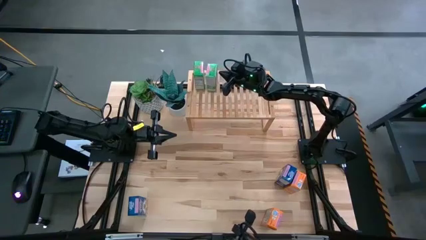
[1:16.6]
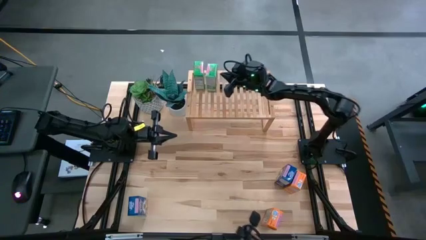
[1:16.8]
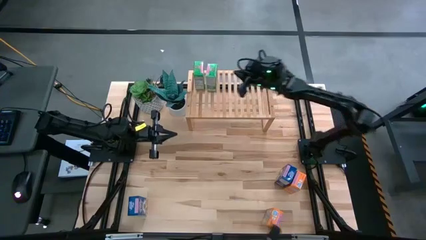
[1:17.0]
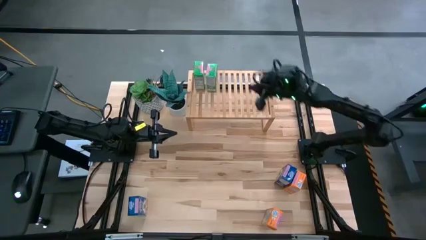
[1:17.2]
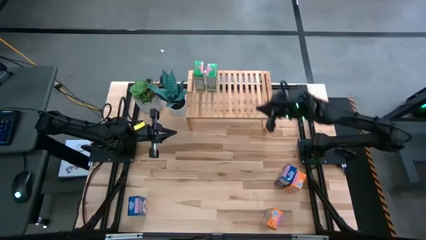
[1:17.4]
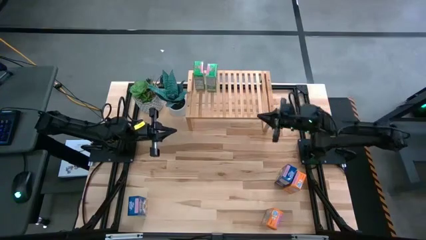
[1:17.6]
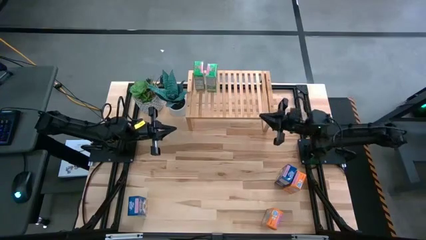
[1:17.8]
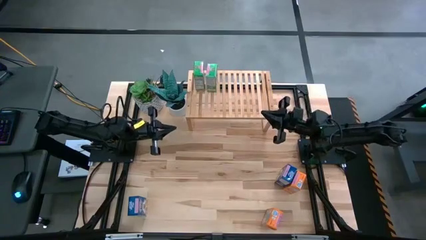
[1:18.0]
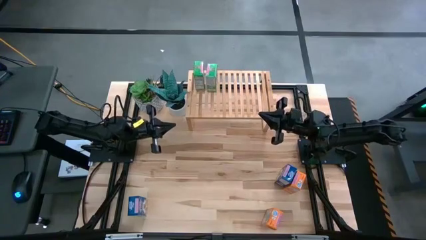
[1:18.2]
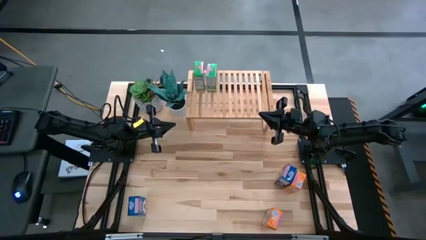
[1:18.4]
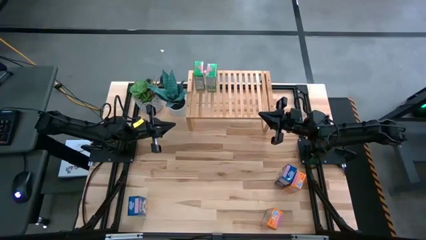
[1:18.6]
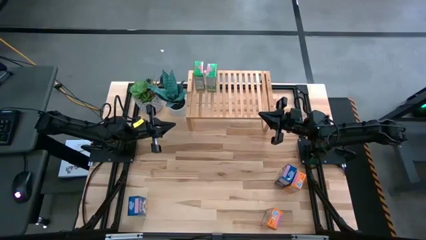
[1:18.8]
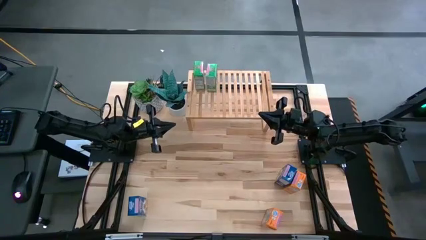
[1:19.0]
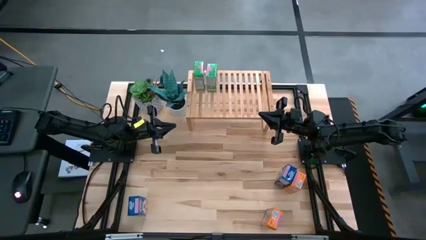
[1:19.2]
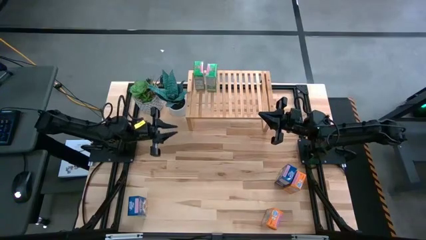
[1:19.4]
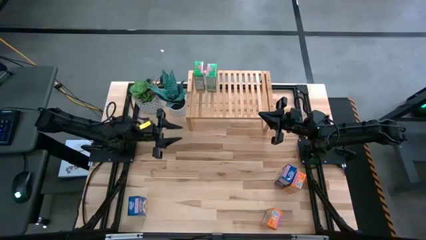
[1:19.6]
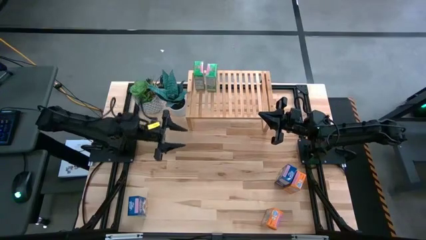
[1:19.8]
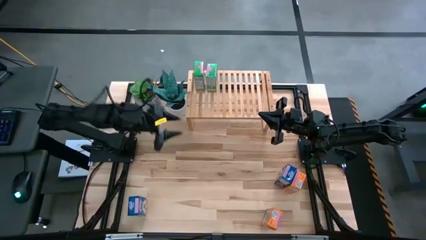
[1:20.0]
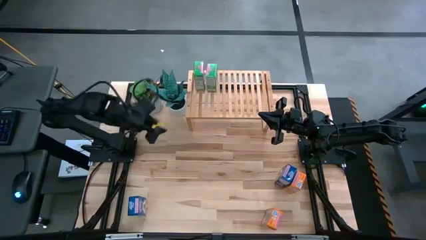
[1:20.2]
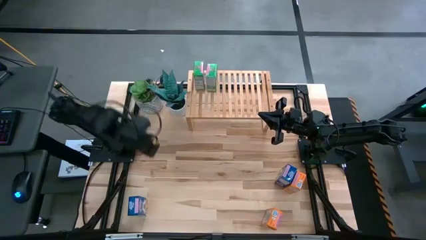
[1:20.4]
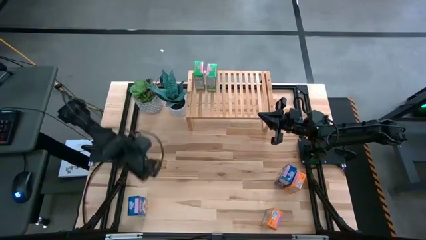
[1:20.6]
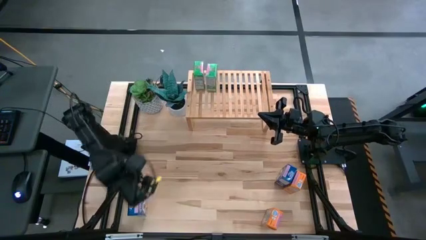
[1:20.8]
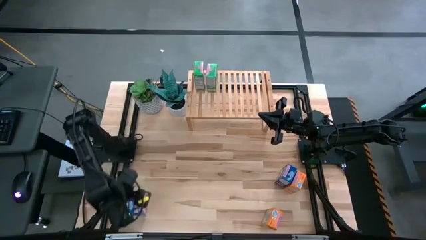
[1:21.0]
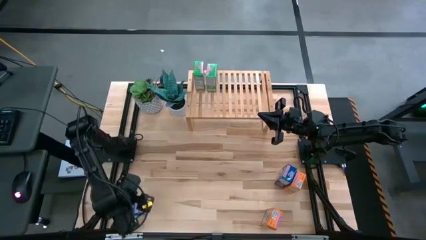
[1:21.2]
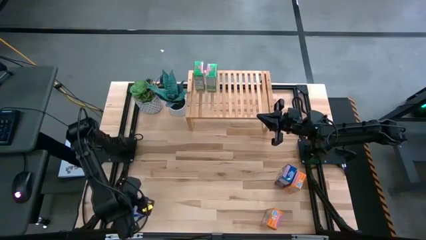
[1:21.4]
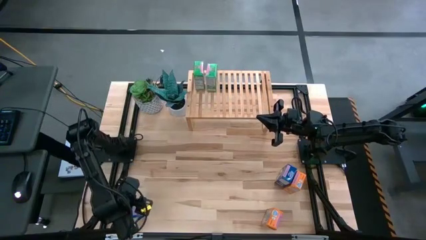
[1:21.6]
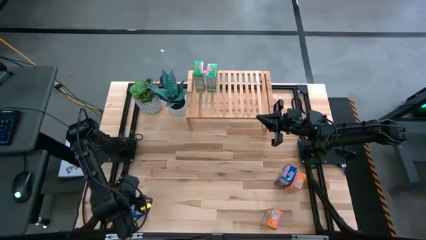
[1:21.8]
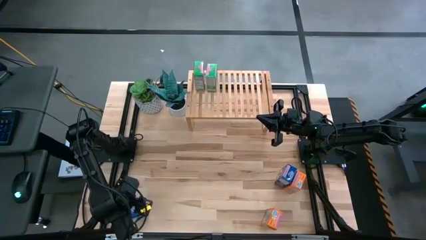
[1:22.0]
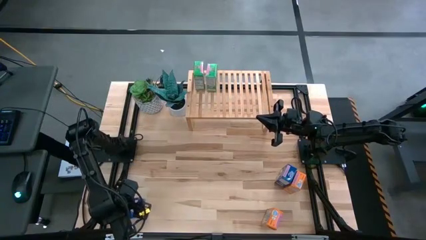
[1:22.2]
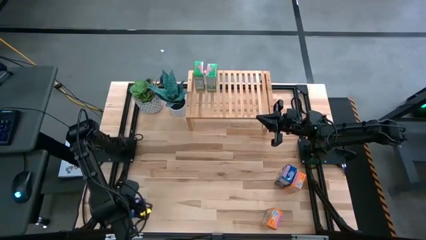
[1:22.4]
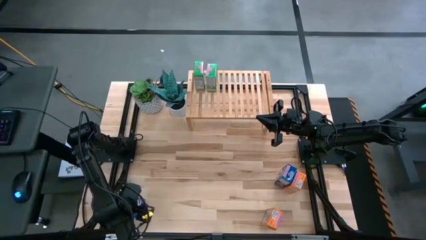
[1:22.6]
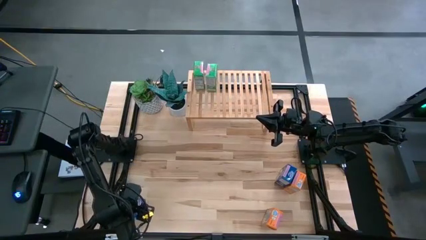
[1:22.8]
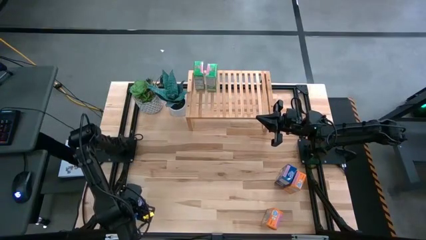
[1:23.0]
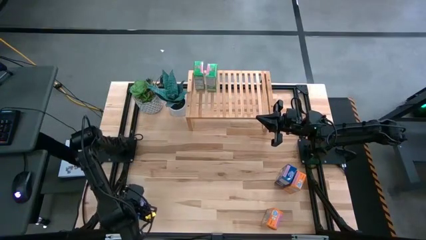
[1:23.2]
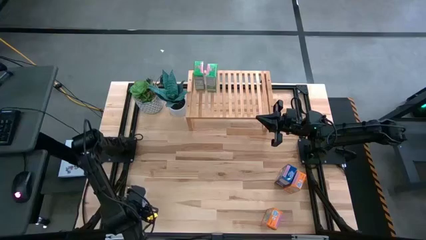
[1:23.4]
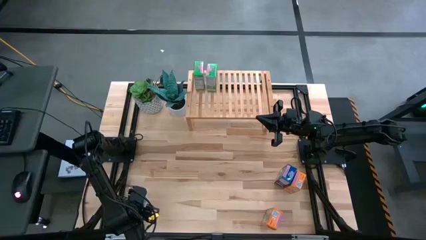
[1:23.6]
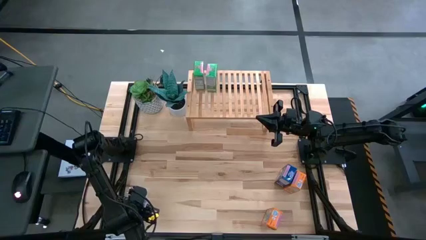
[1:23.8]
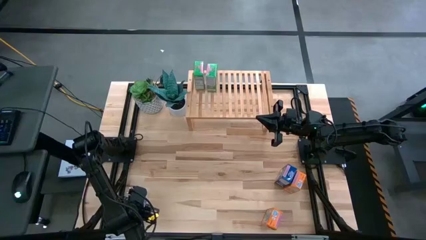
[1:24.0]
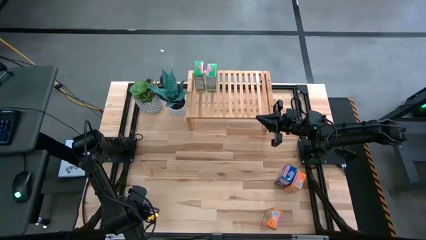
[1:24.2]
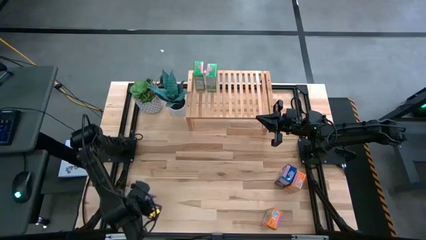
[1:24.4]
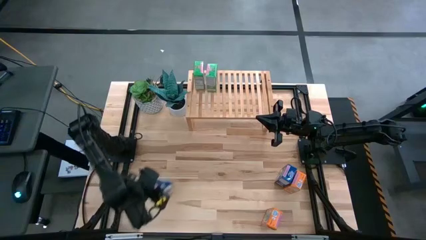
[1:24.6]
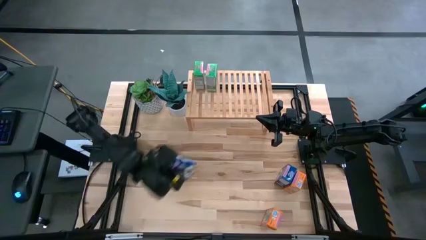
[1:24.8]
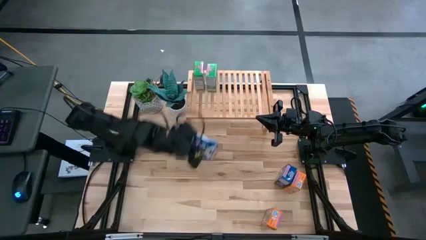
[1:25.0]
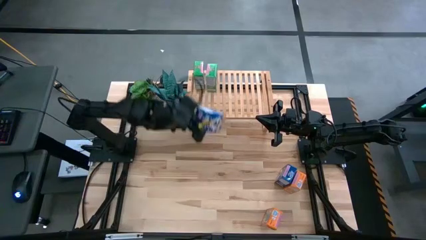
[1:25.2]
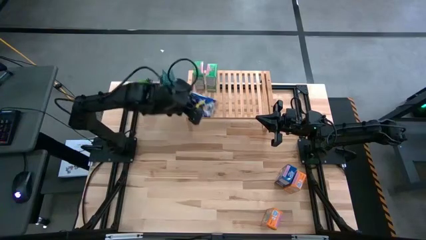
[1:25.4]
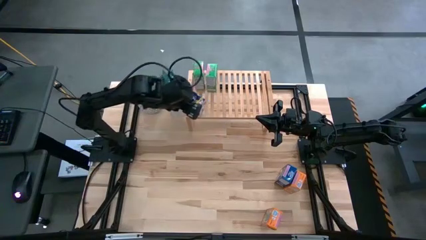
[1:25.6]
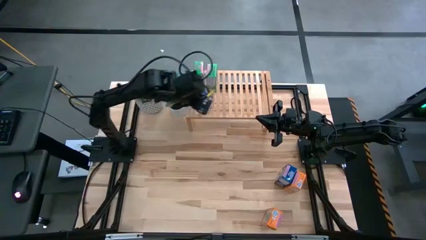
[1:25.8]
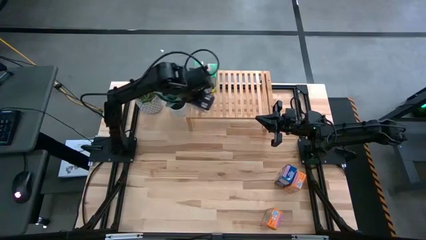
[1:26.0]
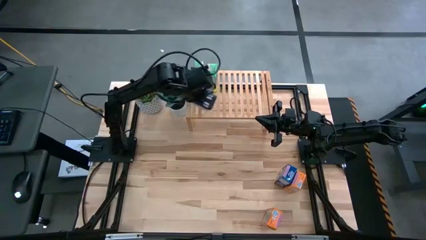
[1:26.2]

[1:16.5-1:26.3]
Task: Stack cereal on shelf
Put the bottom blue cereal box on the shelf

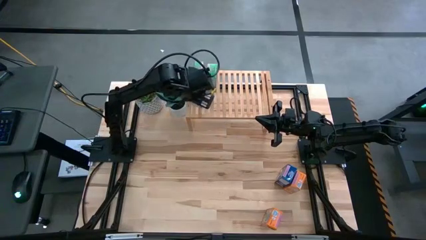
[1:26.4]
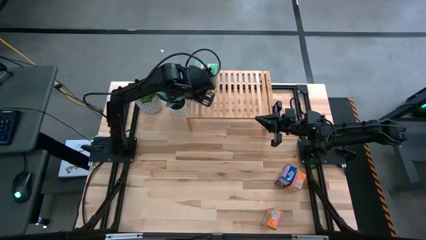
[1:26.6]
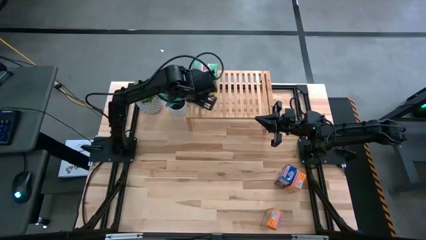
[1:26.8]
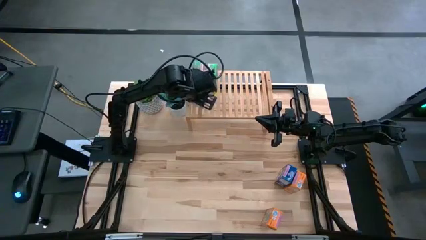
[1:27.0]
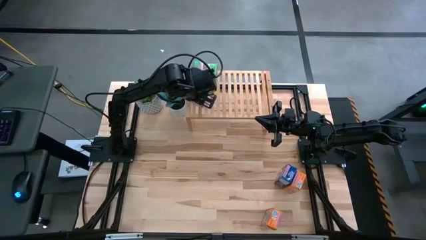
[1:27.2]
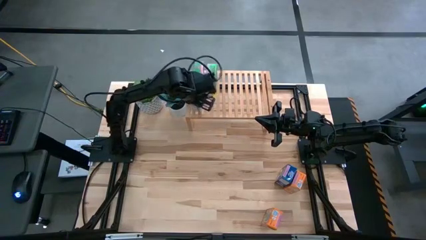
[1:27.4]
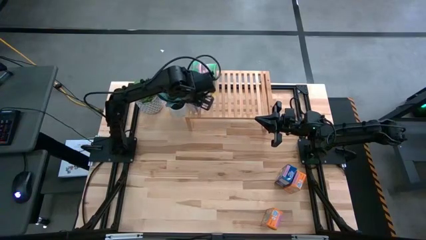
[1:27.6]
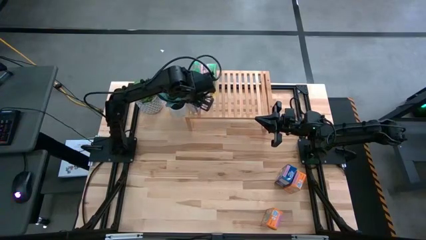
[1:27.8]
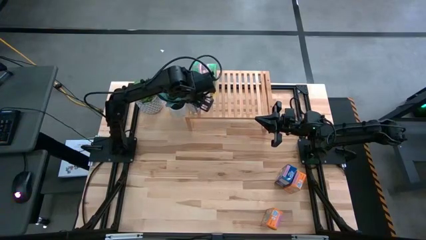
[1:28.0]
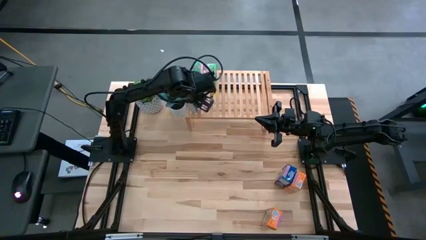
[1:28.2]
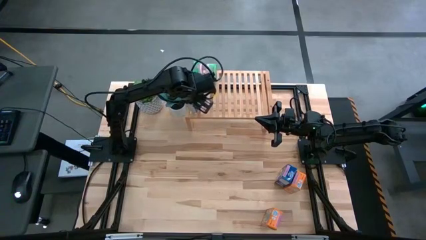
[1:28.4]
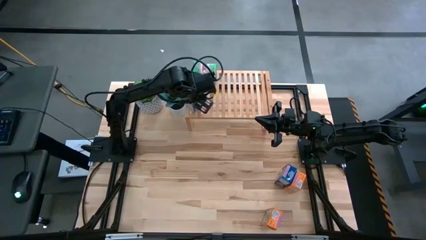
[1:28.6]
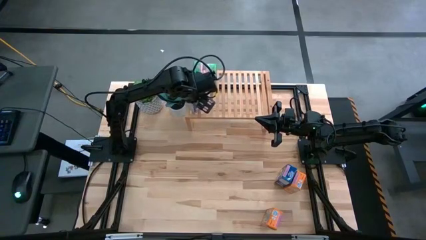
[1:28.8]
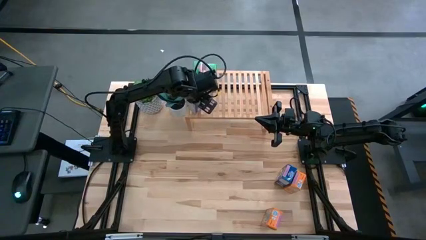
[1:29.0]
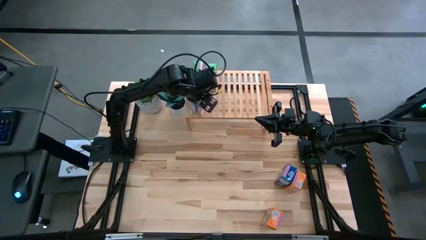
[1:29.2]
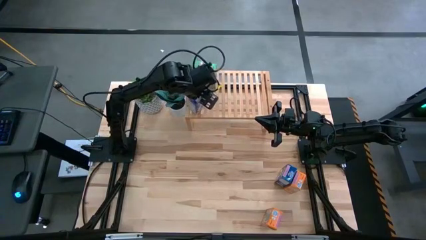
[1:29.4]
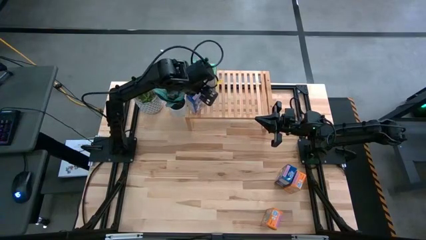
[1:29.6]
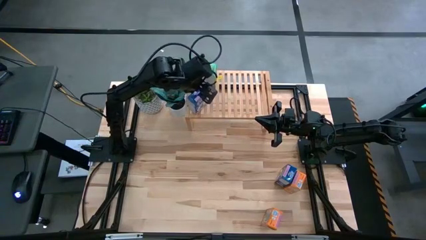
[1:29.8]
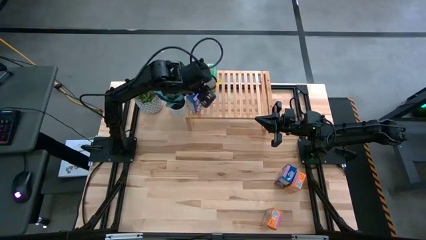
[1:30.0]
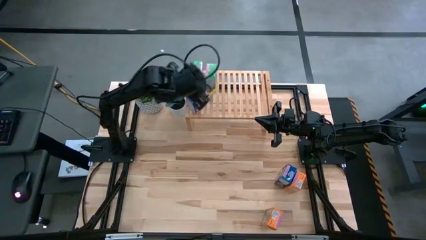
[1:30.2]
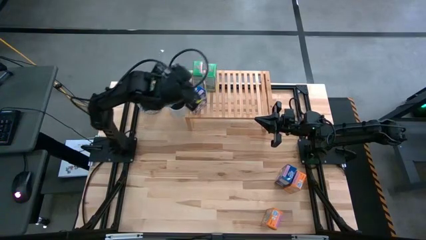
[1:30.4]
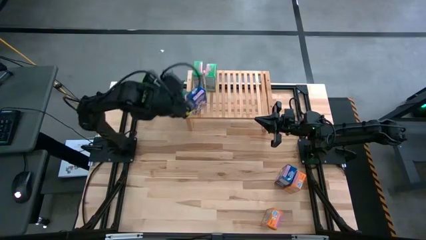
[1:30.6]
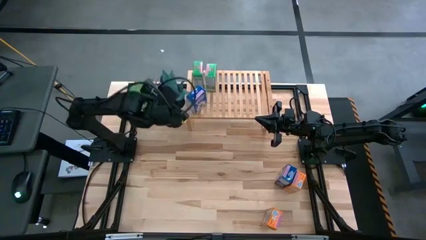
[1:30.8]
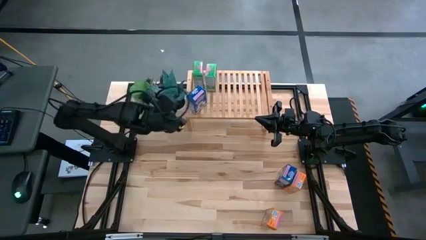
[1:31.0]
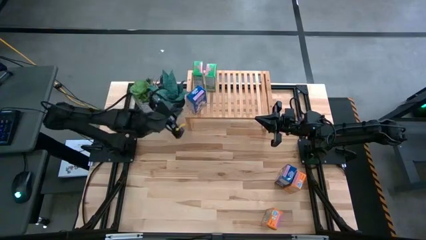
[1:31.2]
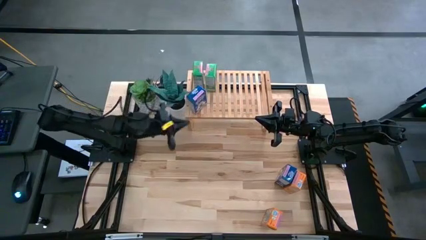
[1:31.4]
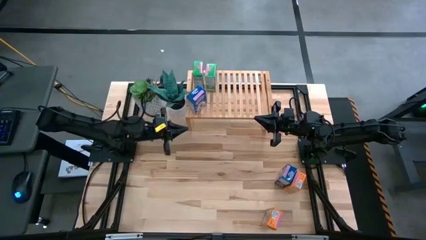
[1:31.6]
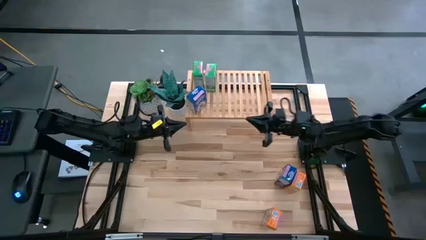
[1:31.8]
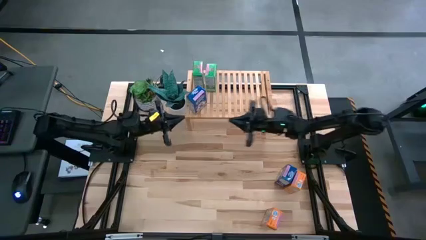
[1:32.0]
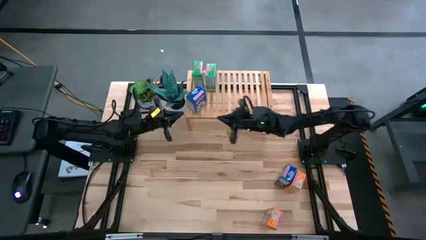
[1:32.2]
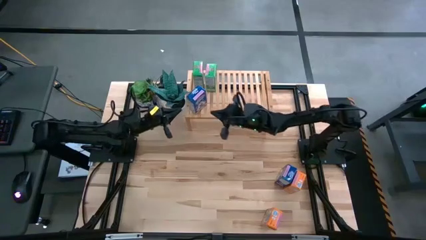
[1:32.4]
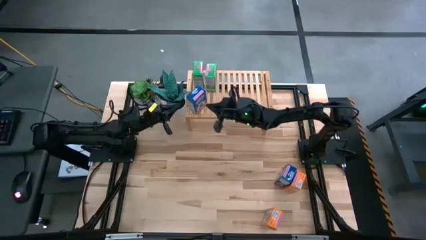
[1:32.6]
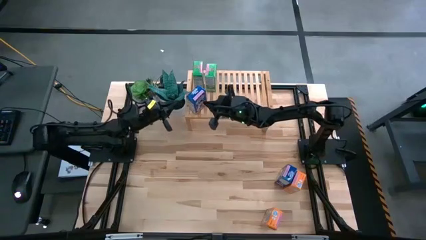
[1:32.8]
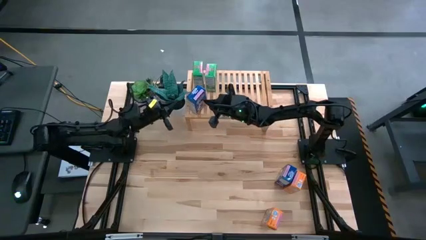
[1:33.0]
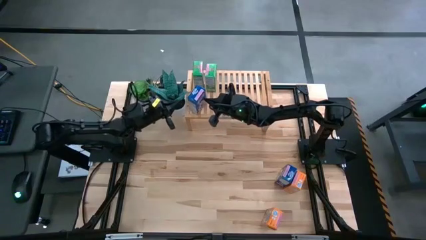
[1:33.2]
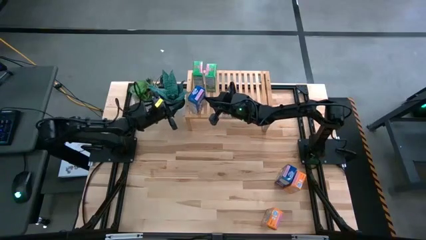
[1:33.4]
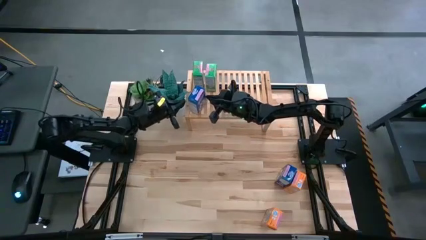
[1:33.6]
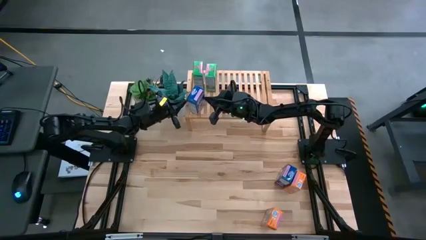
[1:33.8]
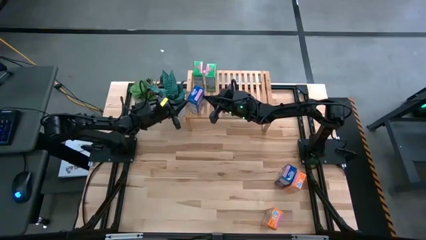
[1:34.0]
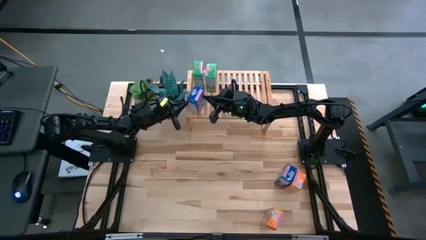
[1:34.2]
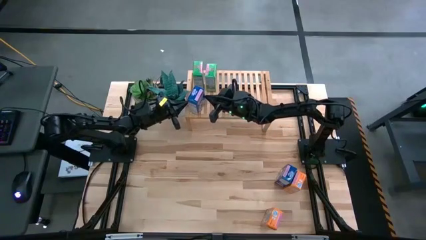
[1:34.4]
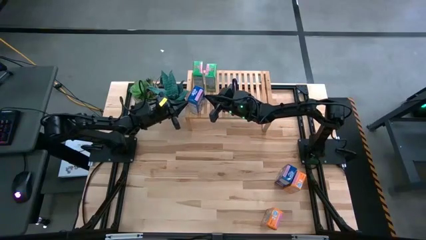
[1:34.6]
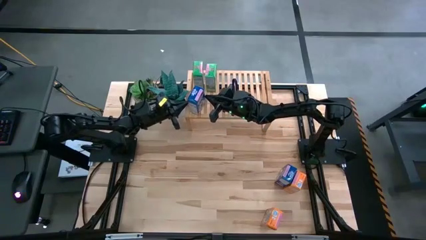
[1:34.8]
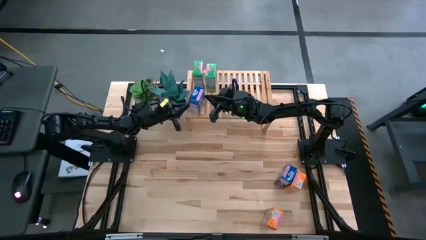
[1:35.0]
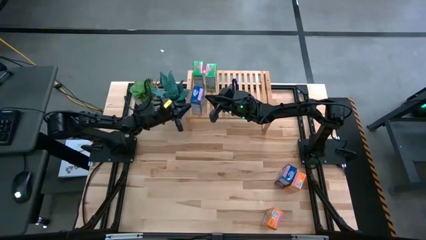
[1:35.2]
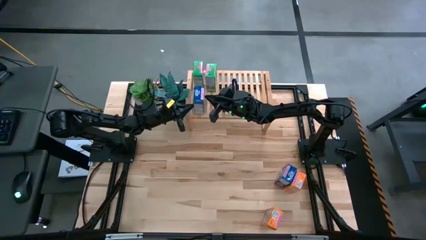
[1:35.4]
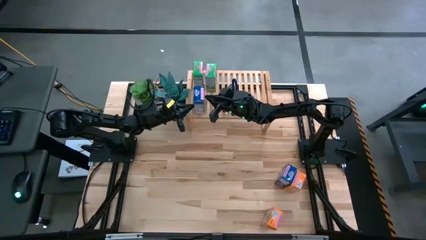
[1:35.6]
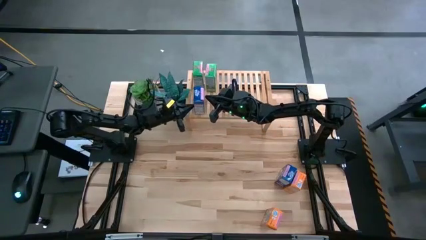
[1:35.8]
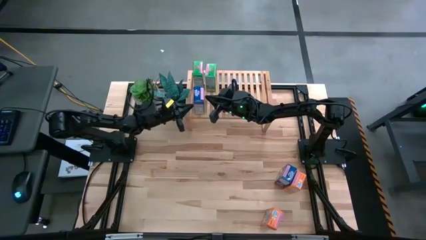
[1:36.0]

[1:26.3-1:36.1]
Put the bottom blue cereal box on the shelf
